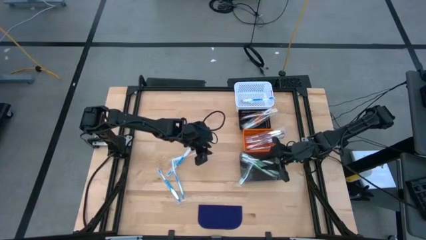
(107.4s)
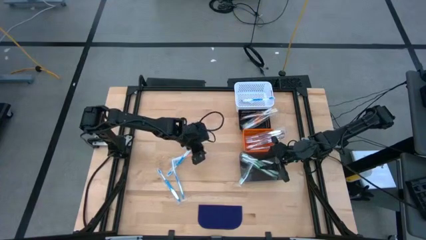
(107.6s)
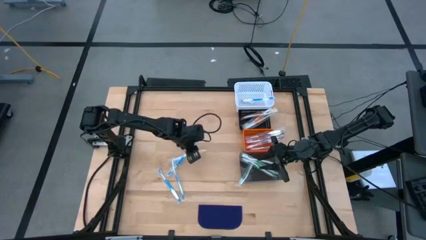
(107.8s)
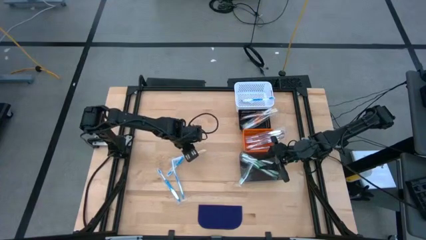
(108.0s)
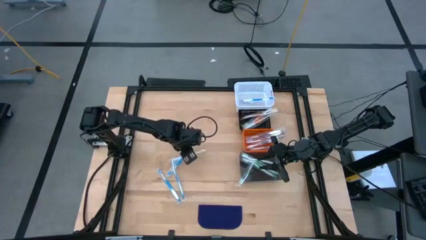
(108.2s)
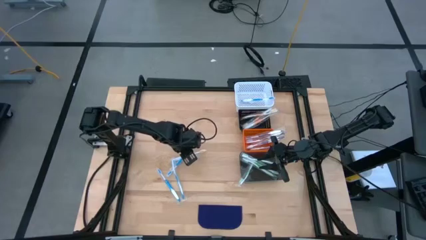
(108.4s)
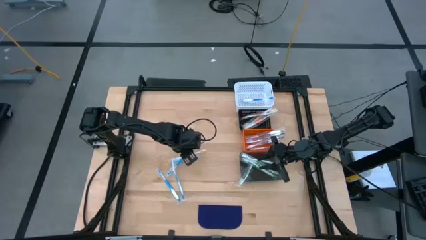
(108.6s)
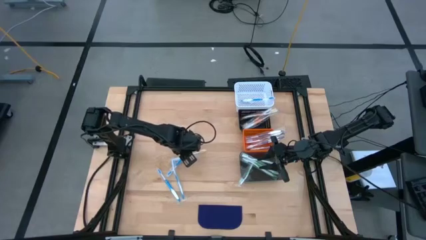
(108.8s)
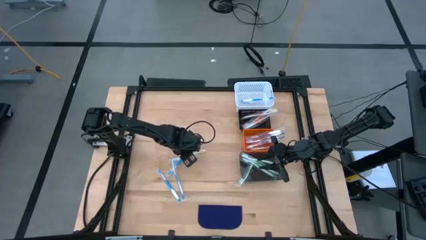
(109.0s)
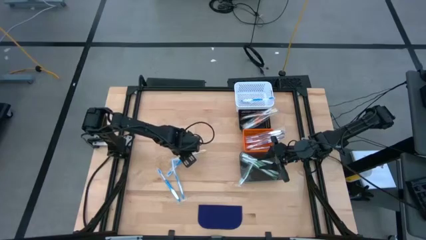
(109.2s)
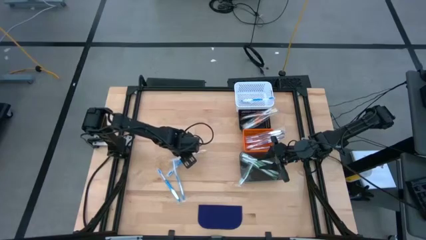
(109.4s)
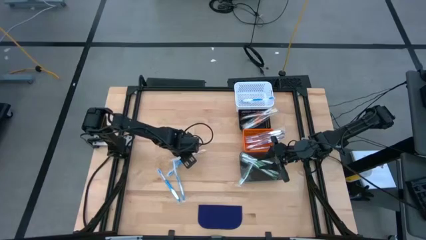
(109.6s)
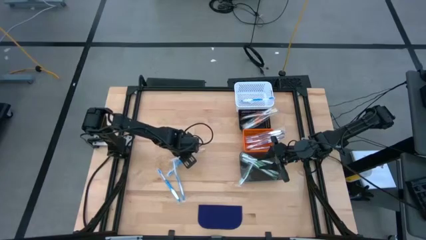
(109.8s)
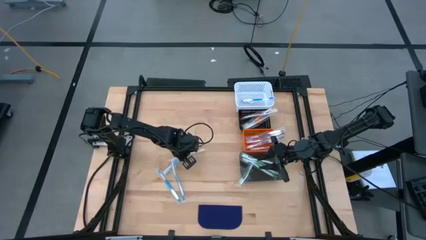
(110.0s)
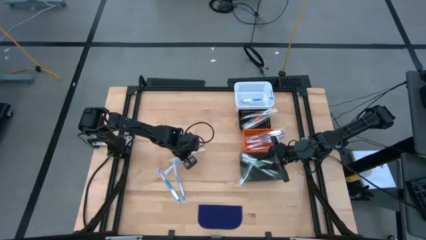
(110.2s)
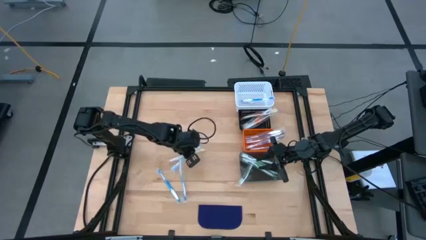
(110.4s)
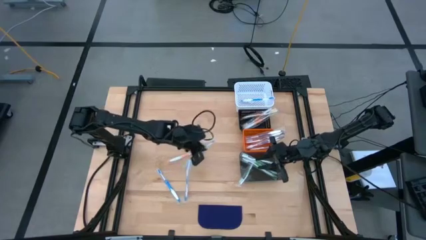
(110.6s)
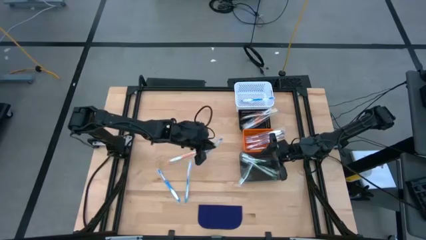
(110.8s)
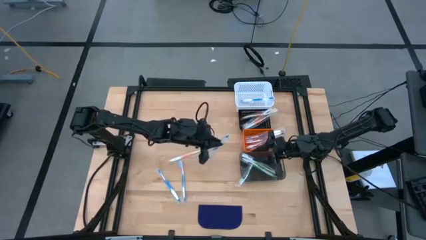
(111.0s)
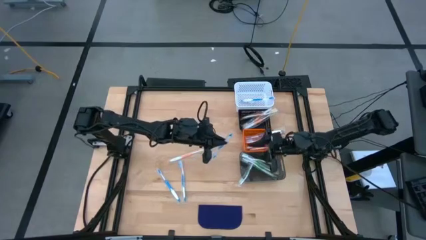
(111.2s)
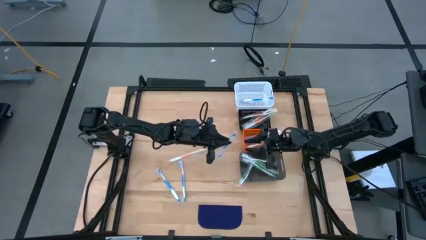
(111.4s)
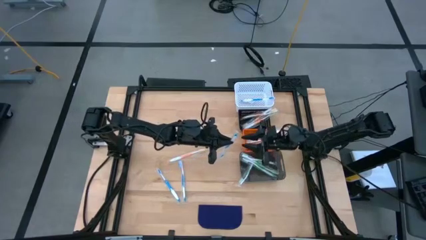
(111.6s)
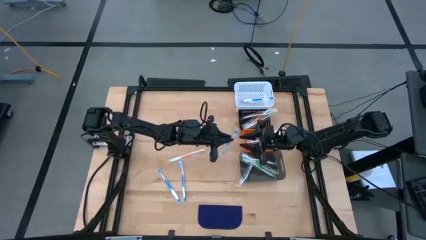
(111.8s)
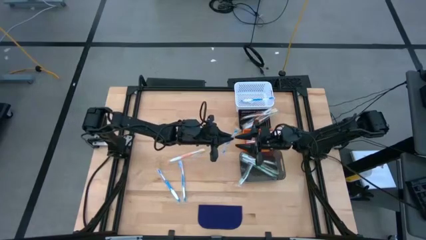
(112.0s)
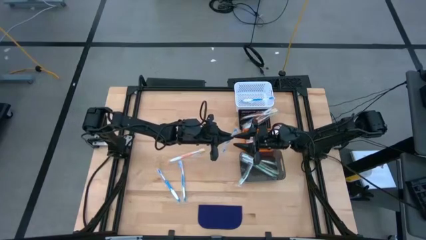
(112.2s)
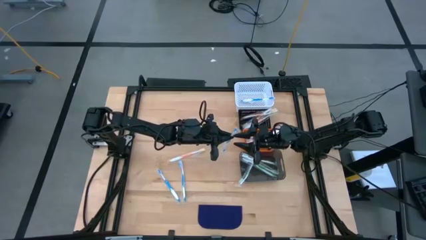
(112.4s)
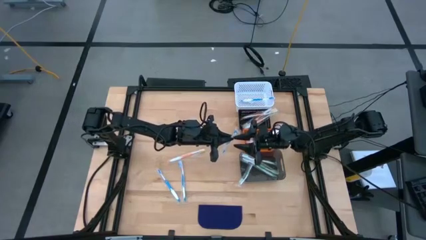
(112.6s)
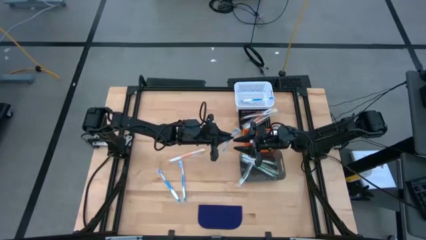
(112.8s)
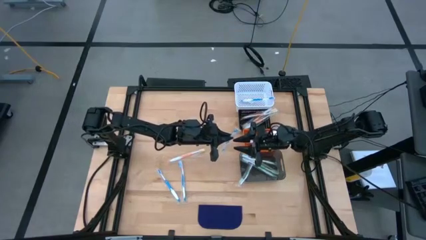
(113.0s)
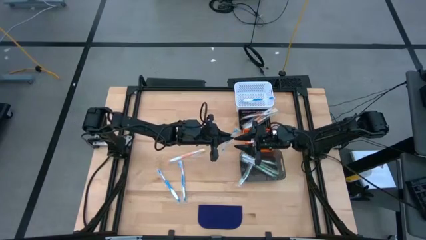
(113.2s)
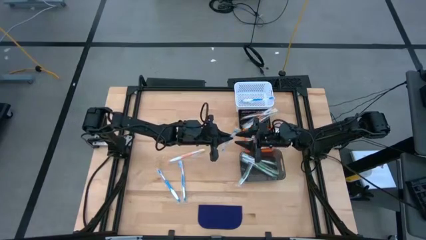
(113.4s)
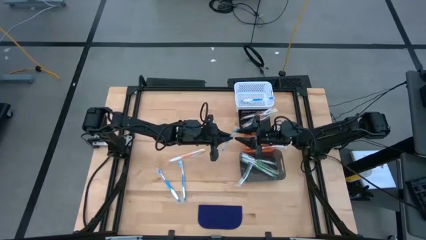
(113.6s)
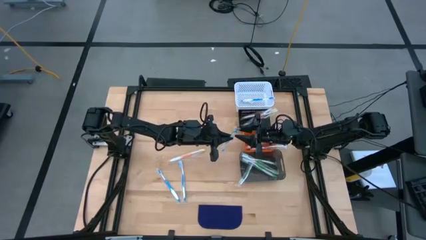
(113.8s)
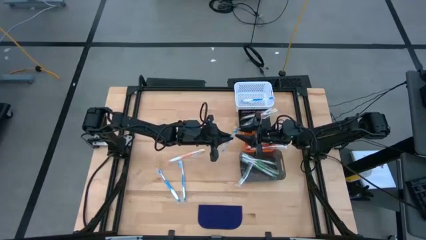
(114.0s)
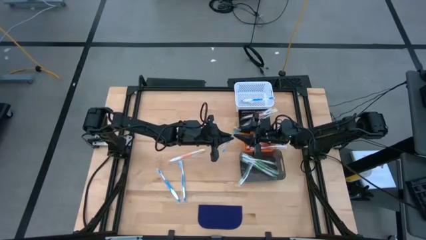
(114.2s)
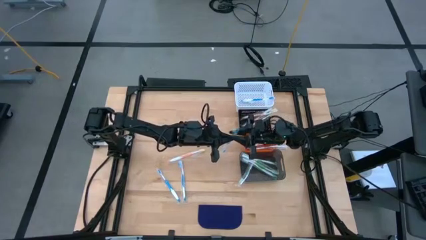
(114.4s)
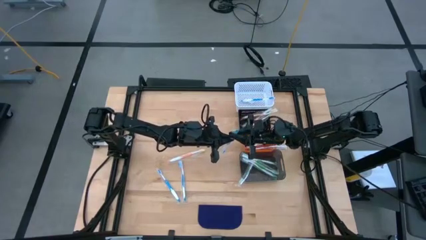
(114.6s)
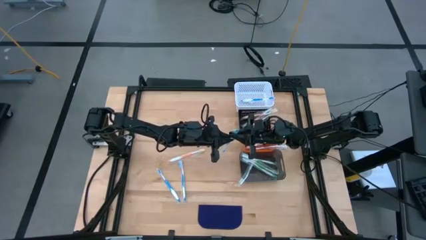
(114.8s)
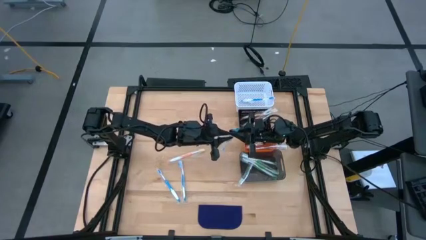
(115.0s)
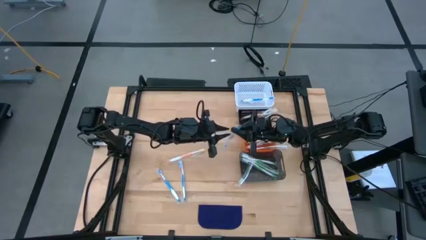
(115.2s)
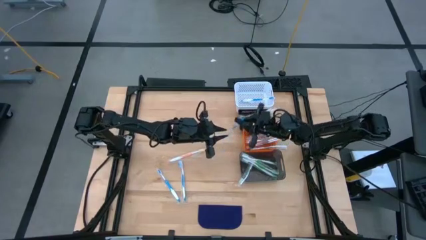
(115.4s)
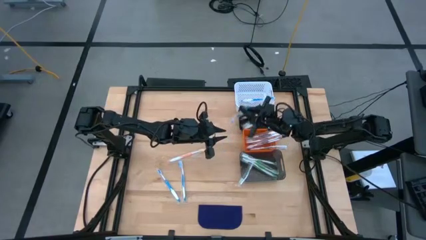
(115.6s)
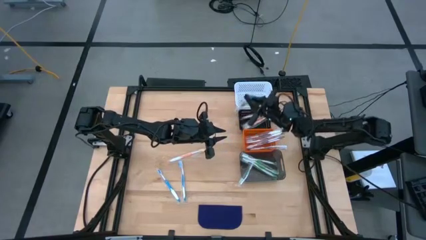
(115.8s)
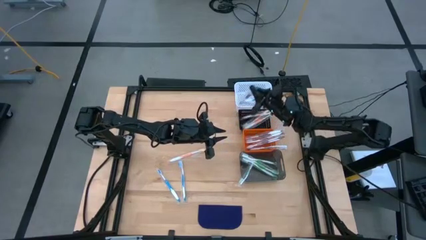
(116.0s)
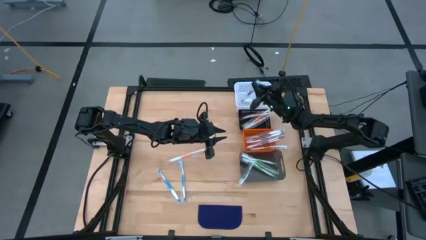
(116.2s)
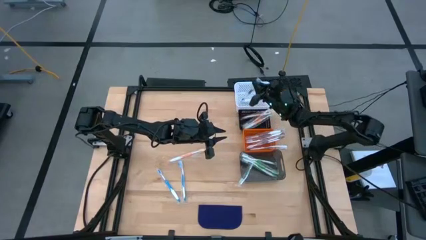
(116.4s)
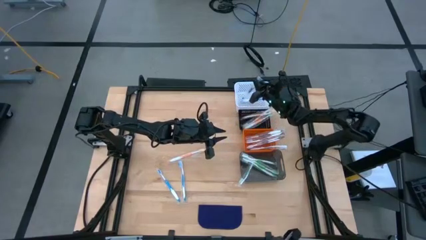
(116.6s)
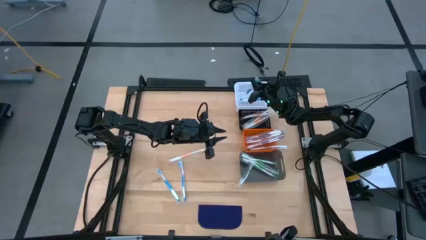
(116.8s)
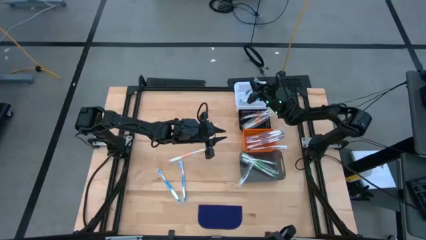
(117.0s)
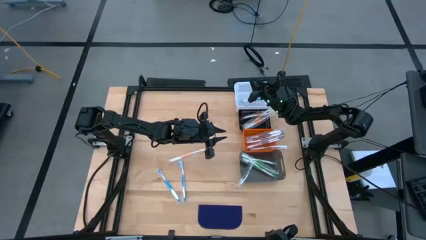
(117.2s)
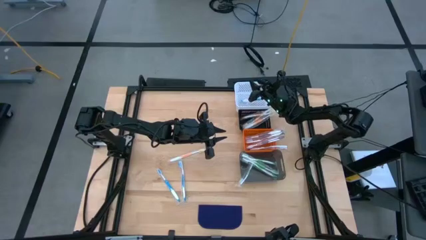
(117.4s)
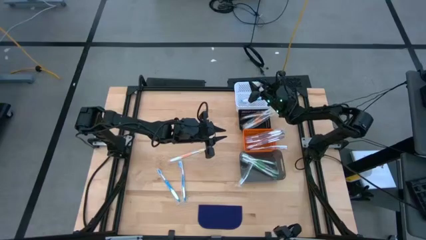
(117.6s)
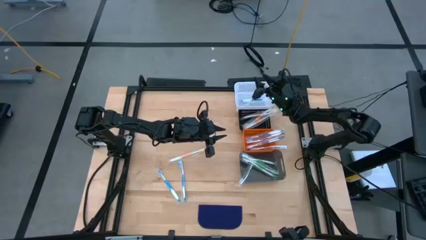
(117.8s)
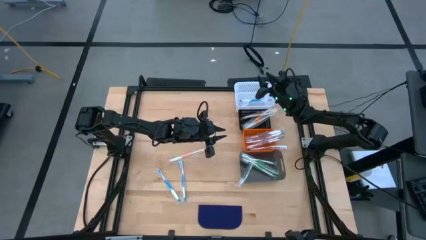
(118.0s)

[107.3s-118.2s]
Task: Pick & Place Toothbrushes
Put the blue toothbrush into the white bin

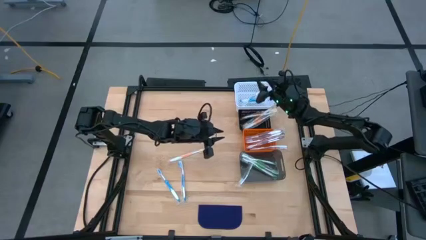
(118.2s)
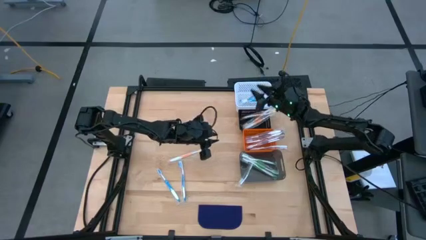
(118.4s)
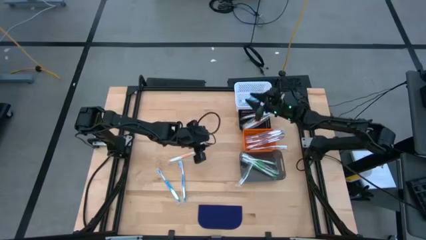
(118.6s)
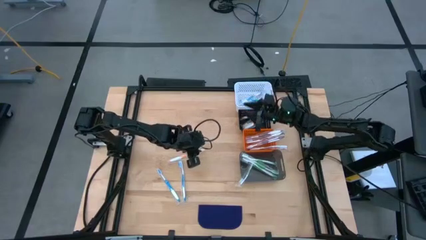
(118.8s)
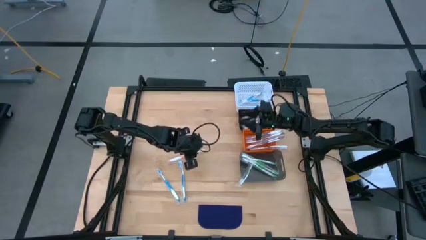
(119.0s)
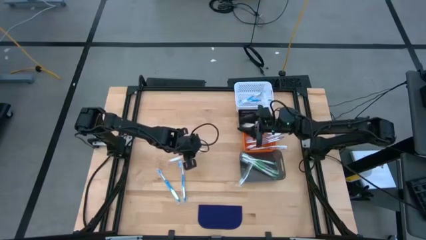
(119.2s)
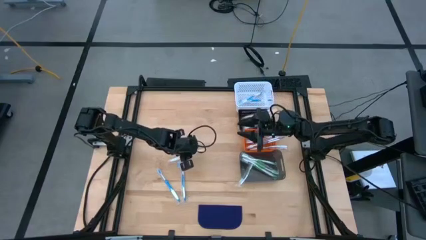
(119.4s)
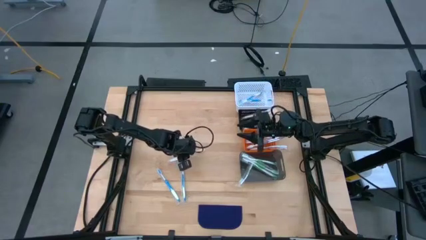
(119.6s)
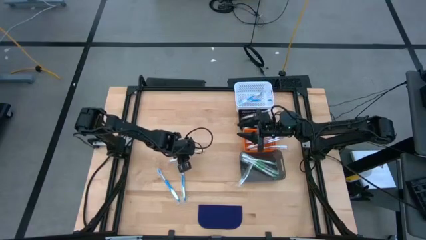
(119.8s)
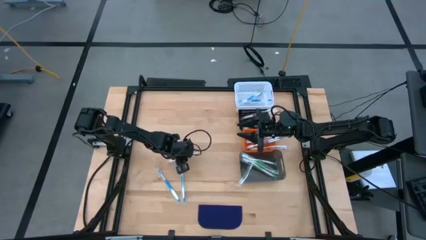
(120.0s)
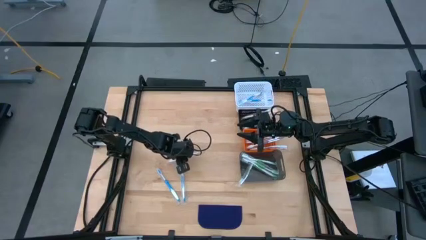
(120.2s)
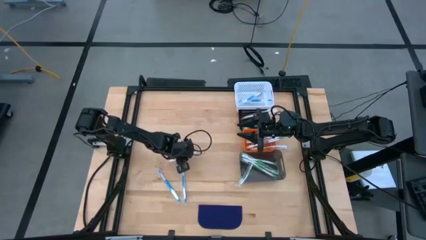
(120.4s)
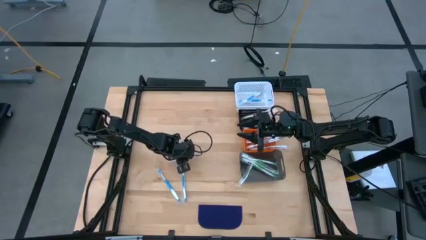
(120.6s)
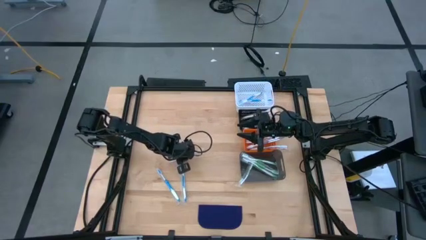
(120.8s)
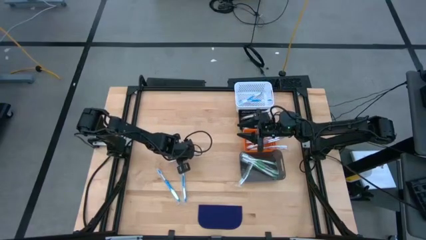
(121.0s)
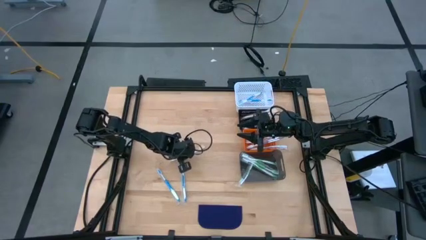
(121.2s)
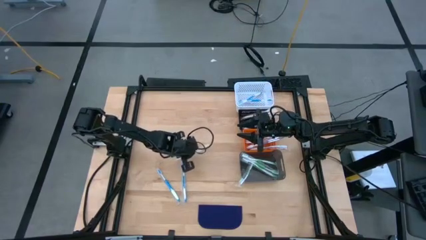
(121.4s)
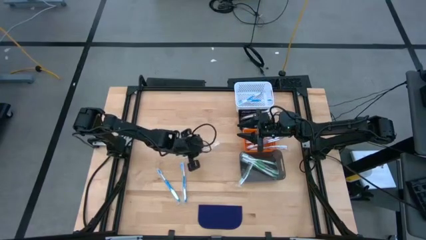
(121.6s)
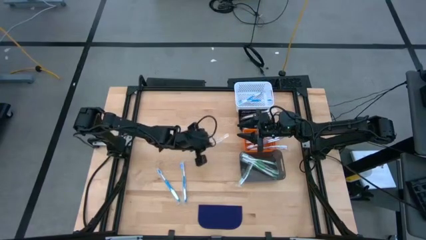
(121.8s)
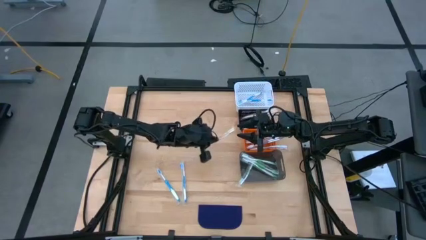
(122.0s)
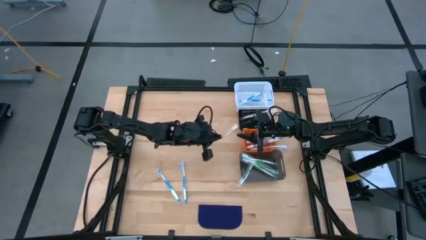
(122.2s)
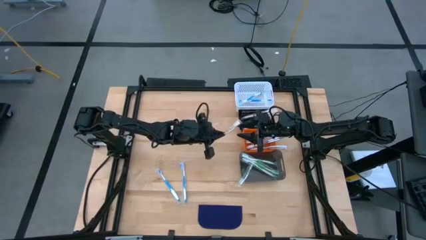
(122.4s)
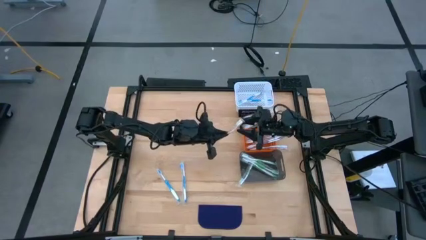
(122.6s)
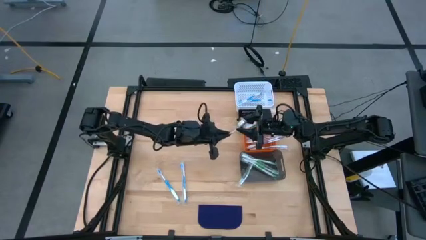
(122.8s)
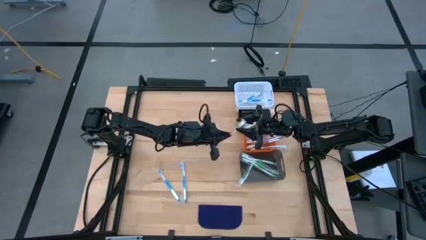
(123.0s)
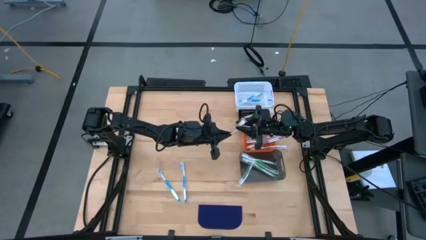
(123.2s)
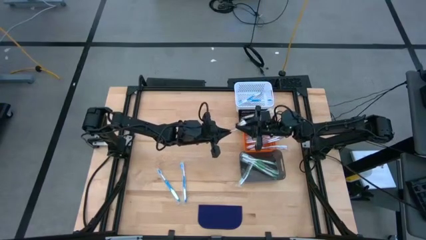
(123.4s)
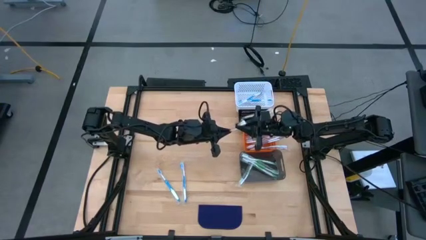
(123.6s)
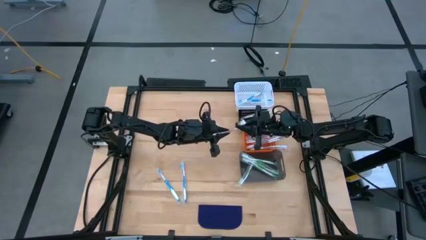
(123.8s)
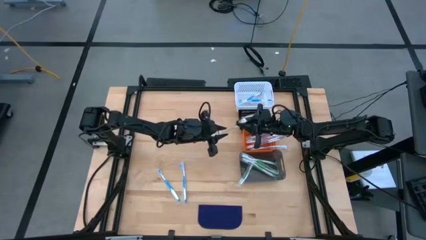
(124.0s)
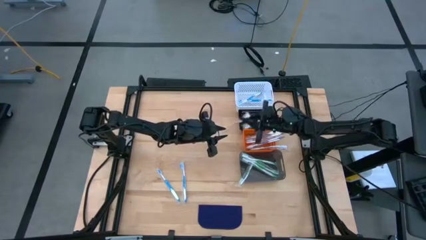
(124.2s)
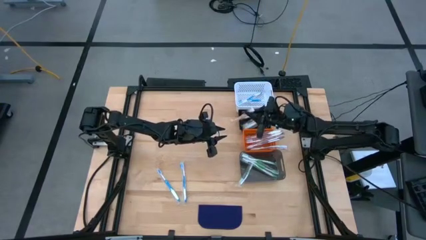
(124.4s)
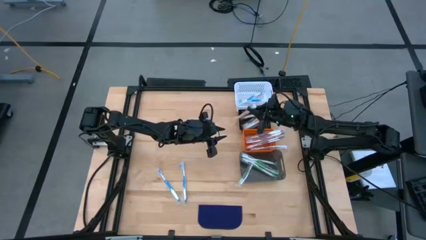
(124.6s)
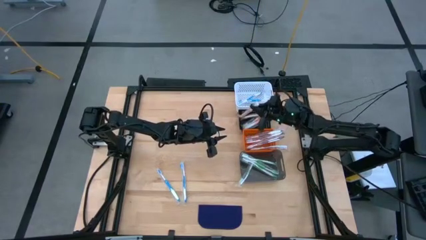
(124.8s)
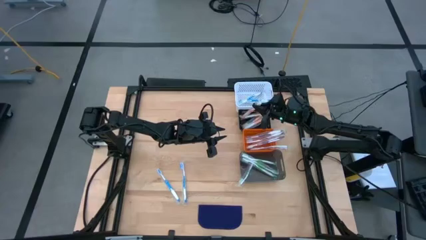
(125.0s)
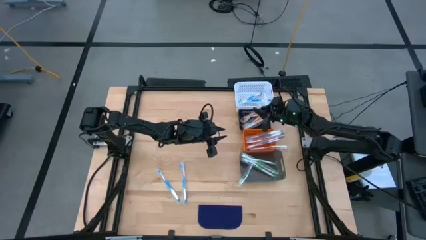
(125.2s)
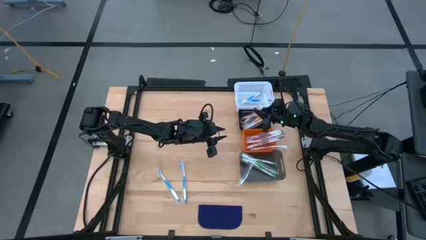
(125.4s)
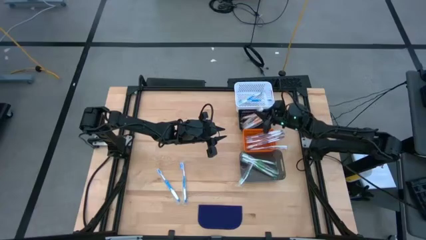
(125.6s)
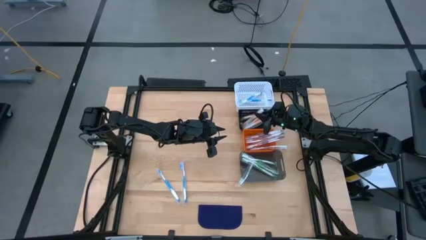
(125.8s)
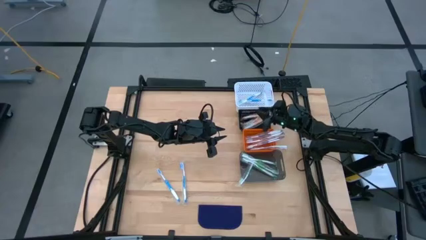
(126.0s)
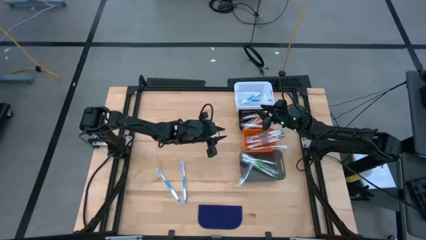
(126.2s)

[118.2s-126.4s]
Put the orange toothbrush into the black bin
